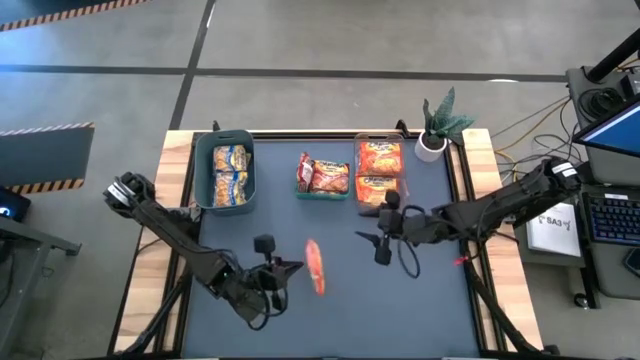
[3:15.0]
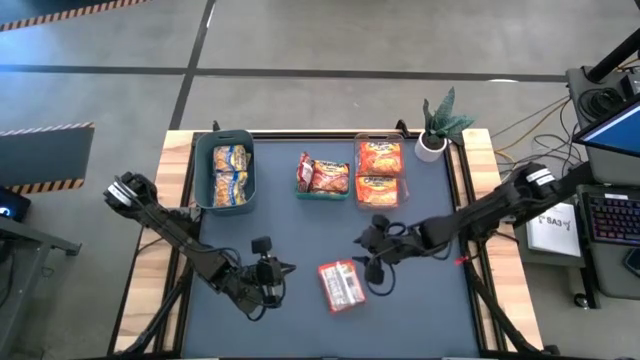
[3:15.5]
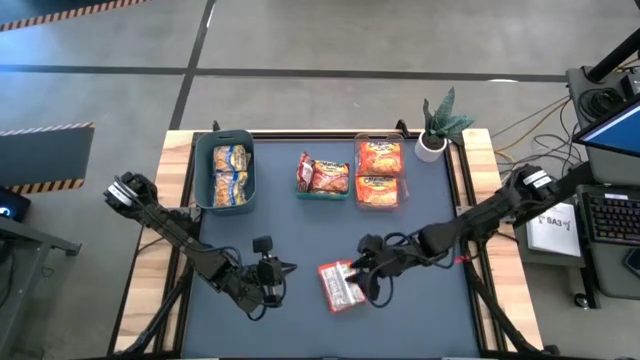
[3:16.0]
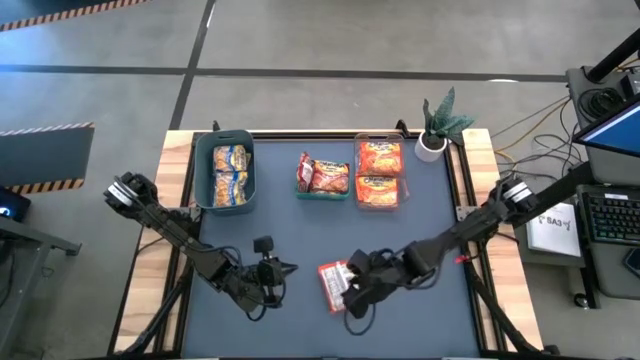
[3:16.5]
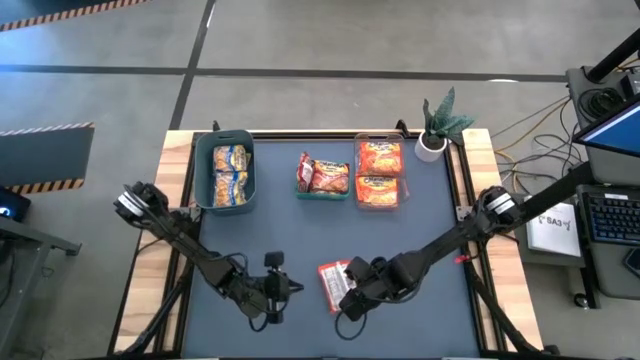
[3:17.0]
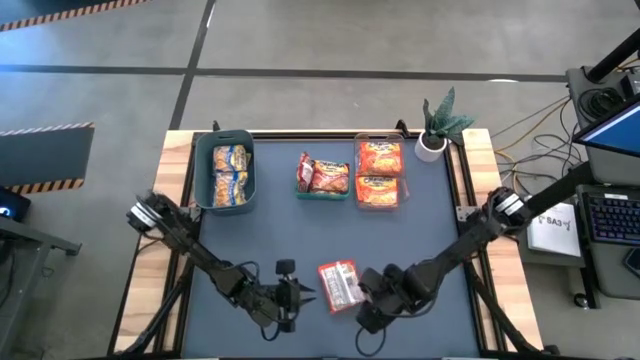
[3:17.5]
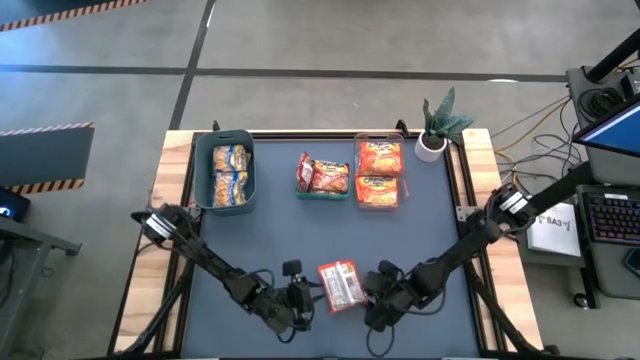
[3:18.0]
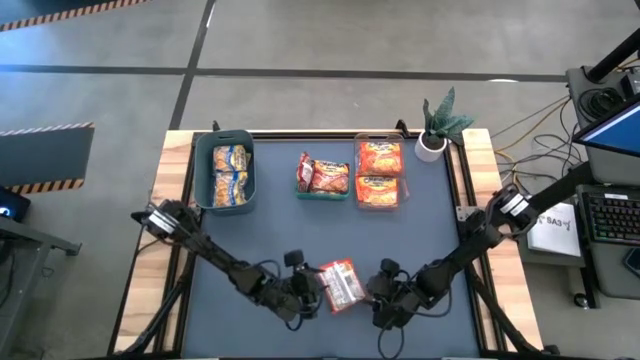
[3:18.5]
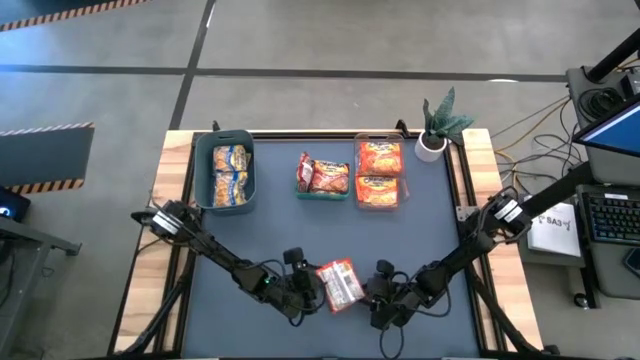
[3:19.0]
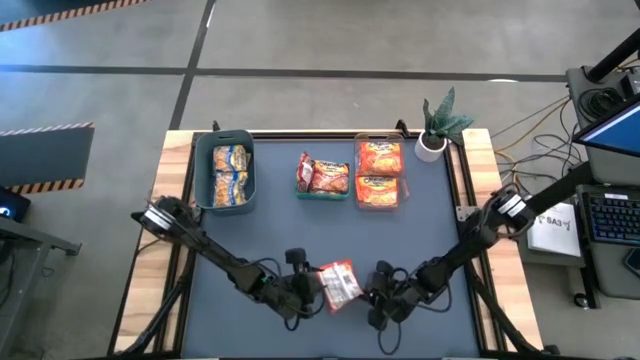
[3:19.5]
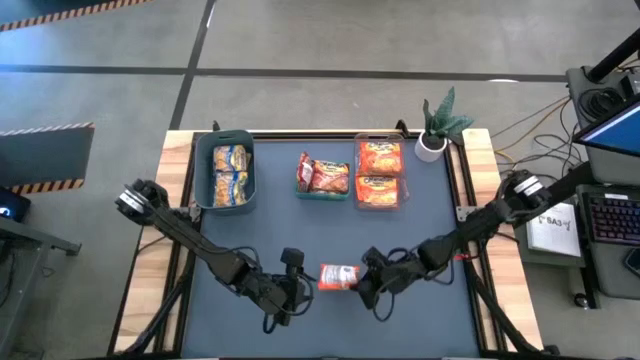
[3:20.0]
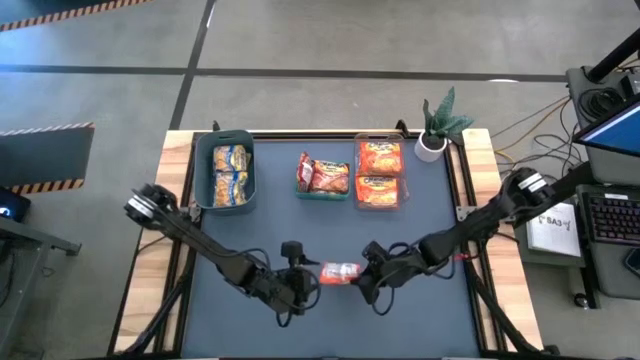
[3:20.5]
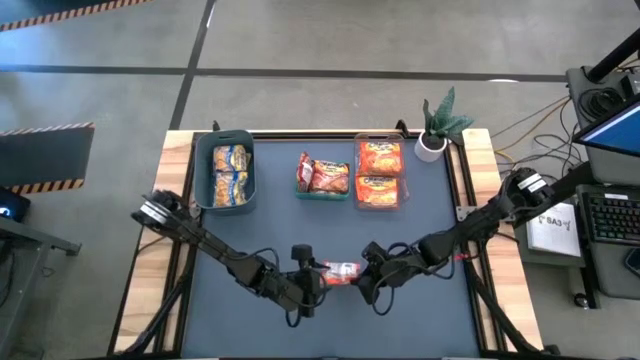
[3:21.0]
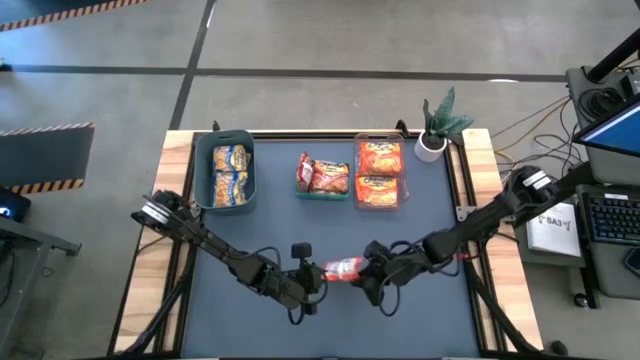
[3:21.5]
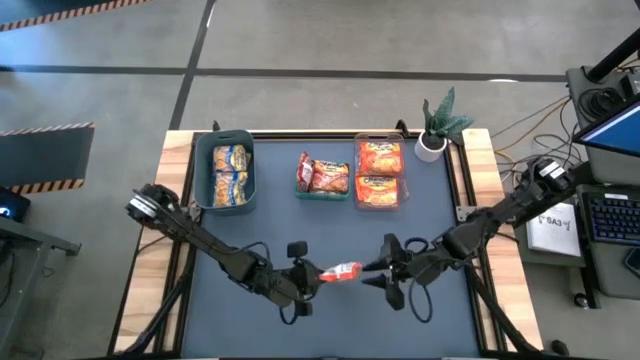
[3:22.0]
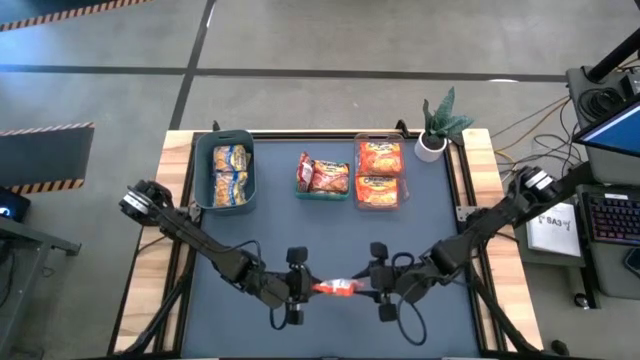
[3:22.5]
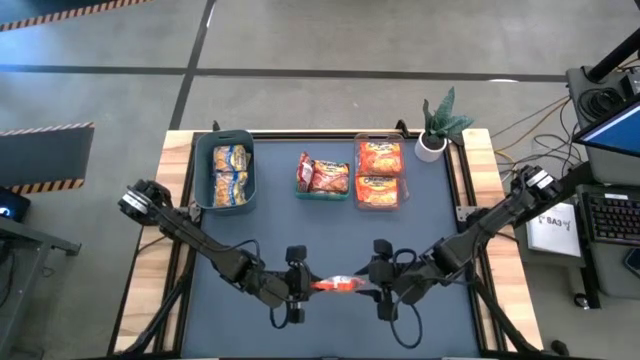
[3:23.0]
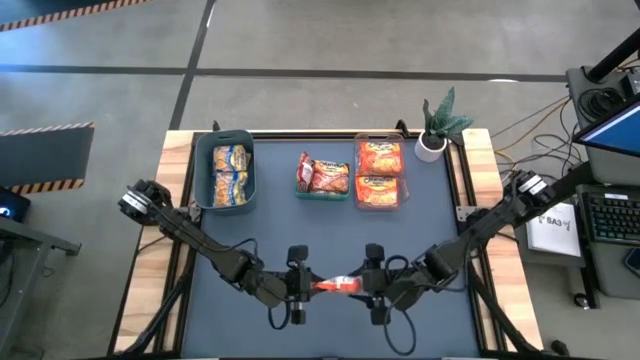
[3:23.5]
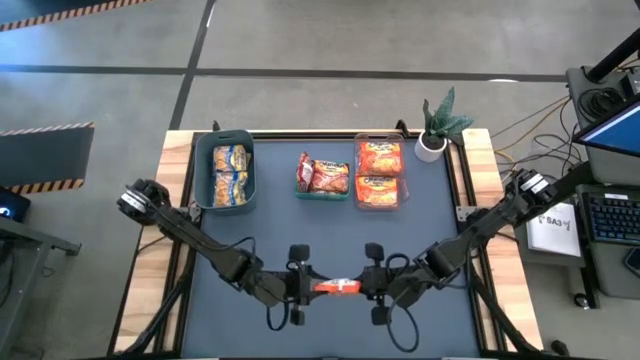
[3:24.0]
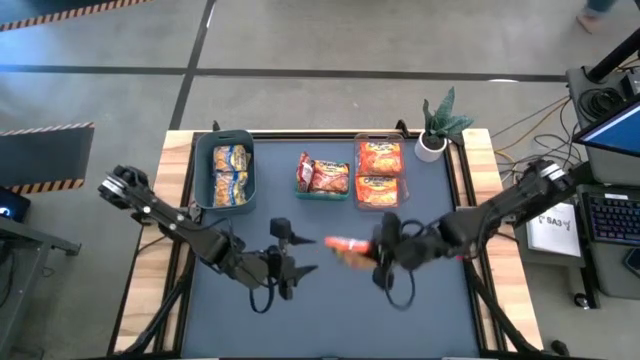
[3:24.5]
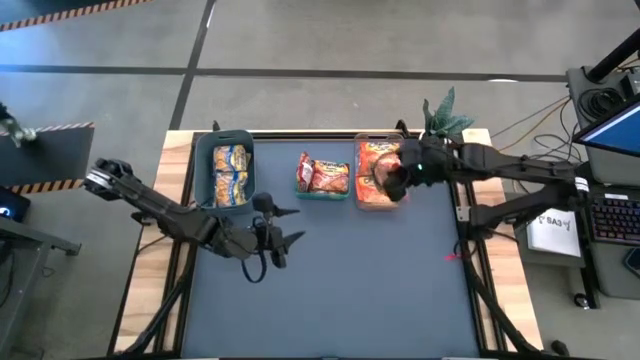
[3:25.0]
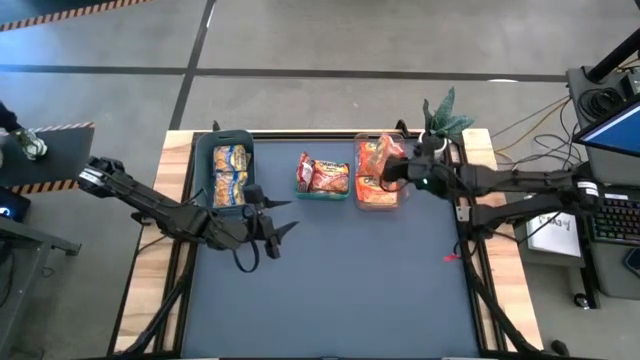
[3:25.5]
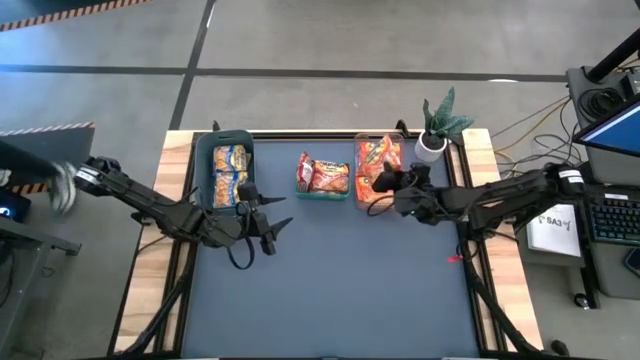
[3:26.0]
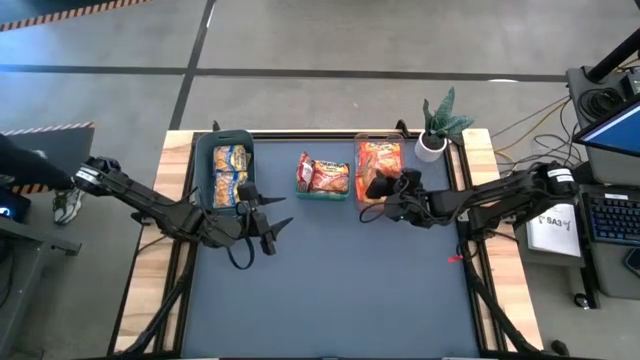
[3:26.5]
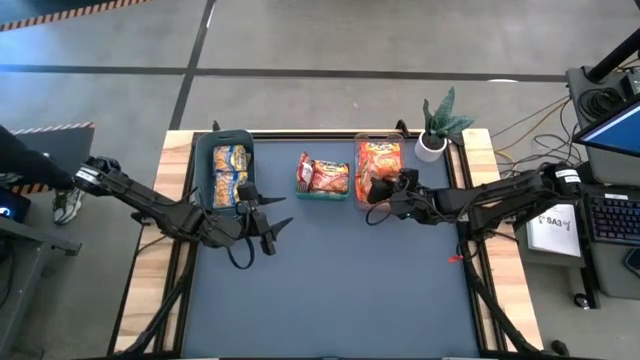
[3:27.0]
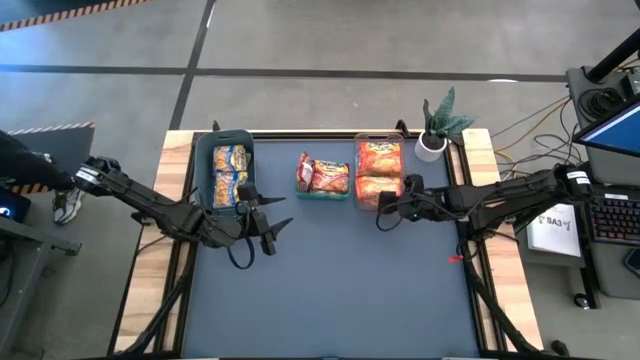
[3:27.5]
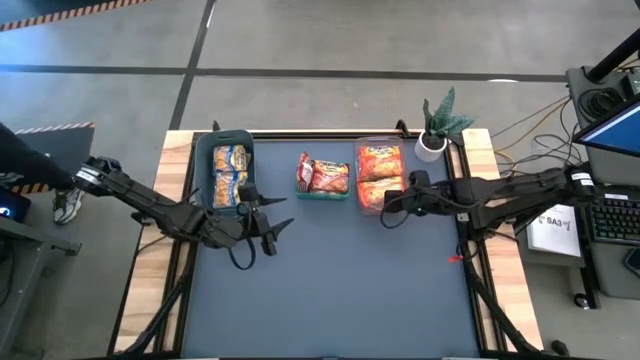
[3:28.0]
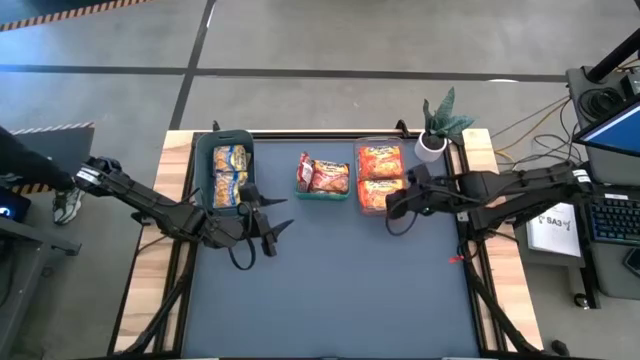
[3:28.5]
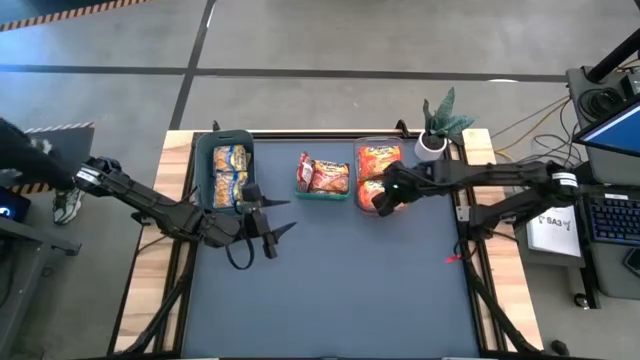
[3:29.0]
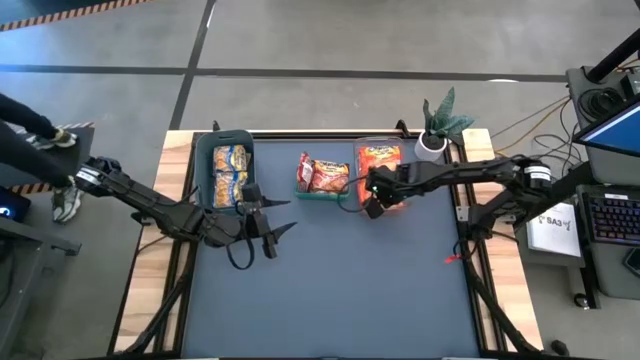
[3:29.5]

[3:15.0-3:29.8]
Task: Sort Maruchan noodles
Put the orange noodle pack into the transparent bin

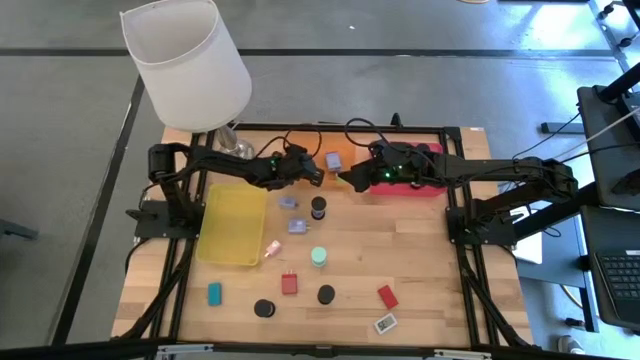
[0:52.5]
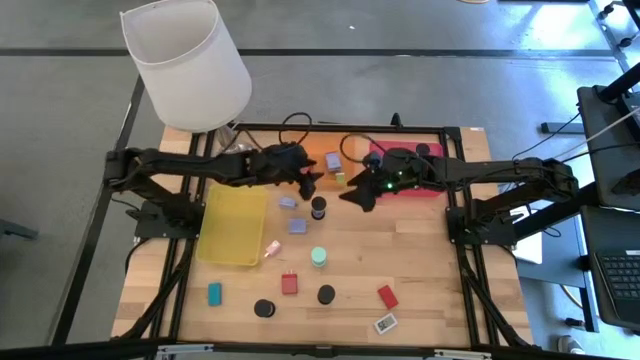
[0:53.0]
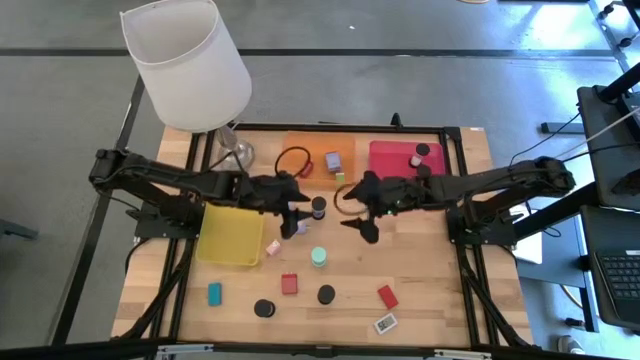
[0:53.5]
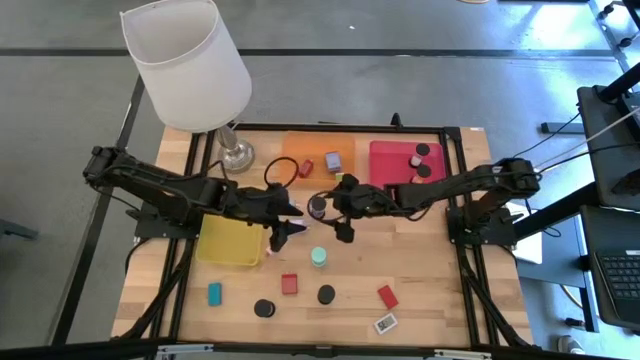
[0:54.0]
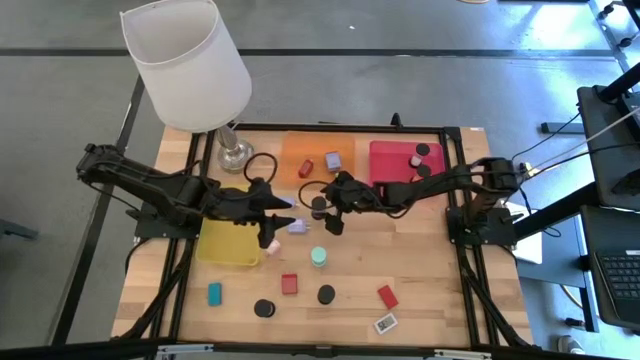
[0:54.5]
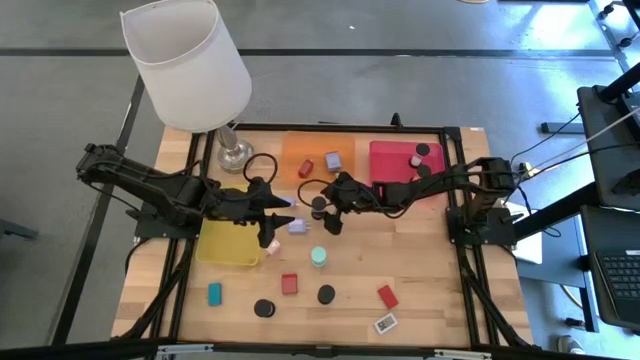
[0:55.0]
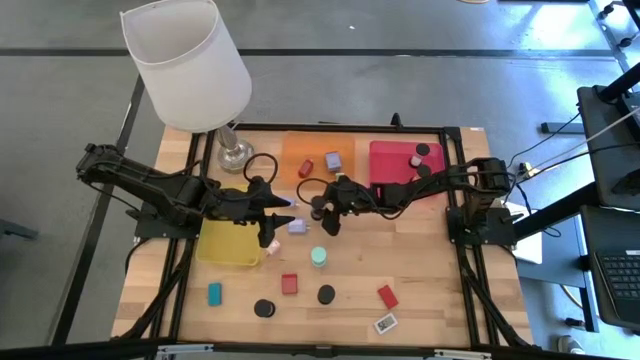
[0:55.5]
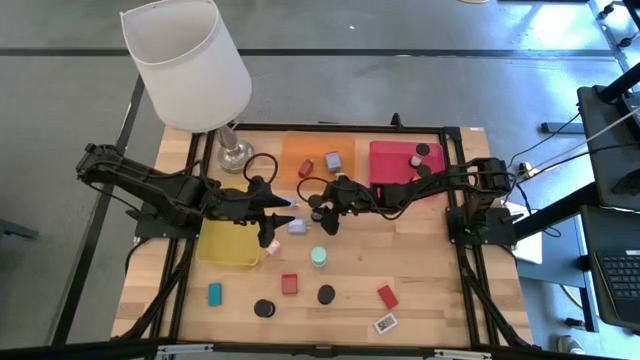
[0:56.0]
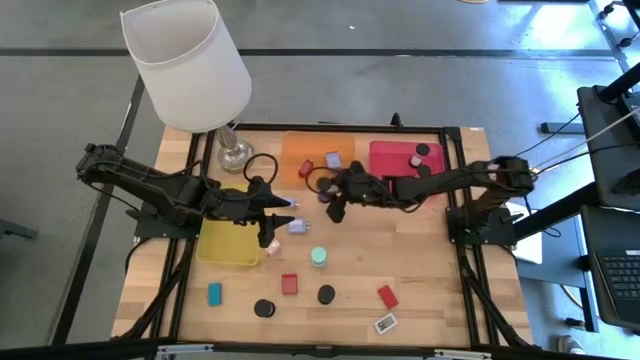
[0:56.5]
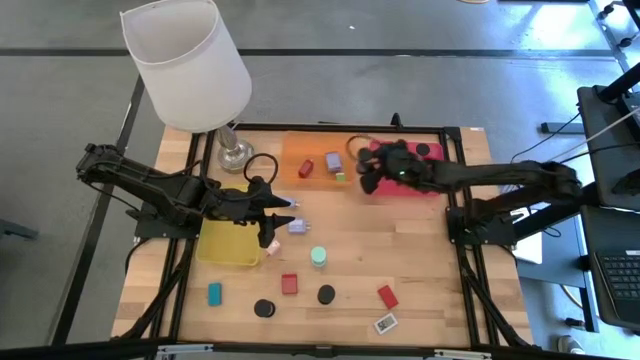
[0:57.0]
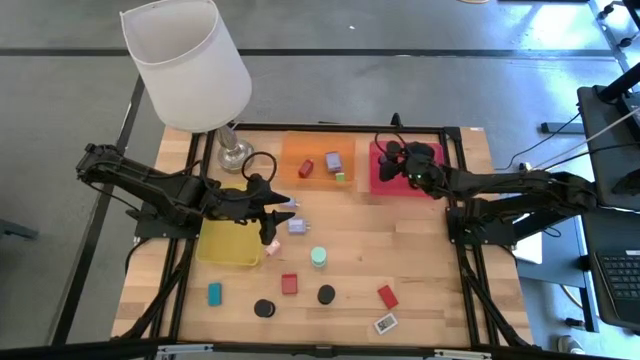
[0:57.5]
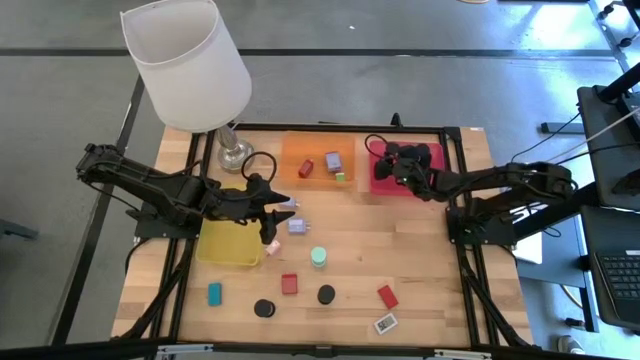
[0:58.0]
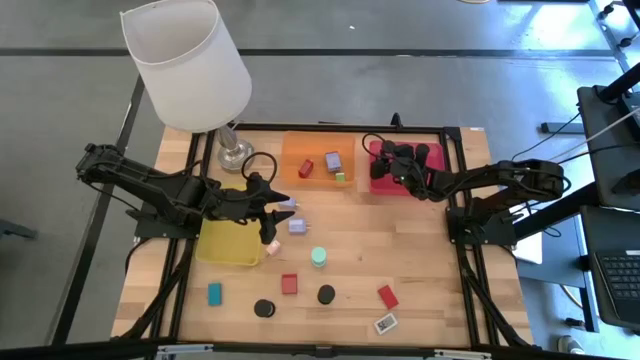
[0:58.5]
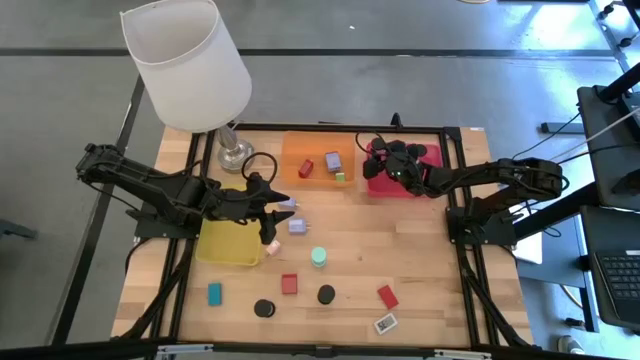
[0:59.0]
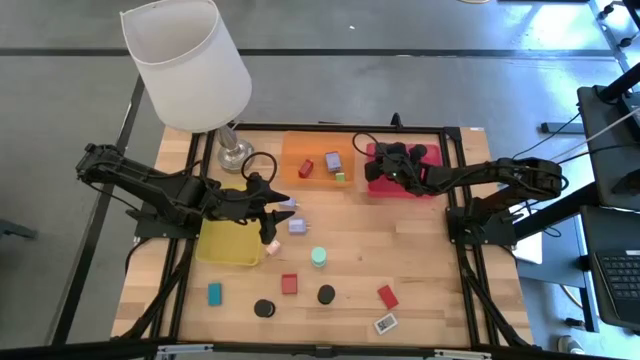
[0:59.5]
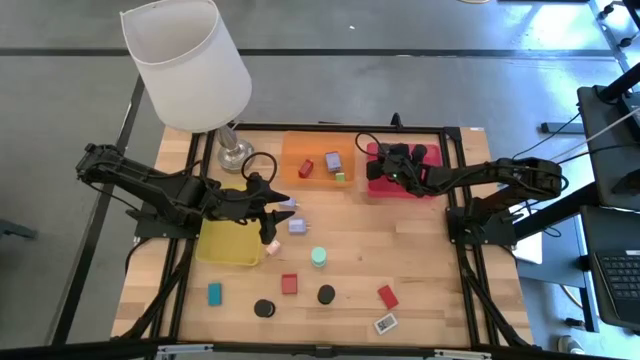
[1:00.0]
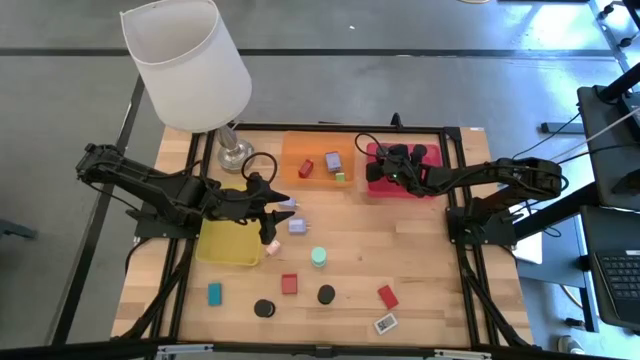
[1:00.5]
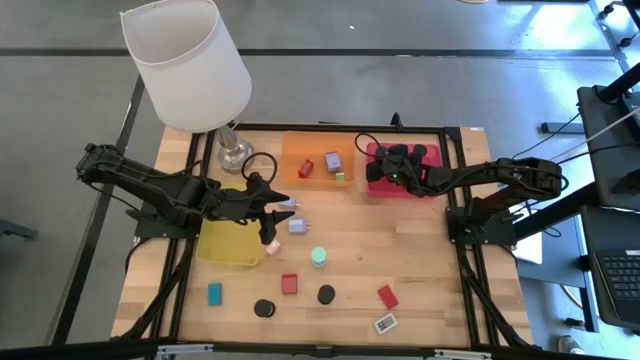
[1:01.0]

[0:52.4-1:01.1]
Task: Pick & Place Office items
Put the dark blue hourglass into the pink bin
